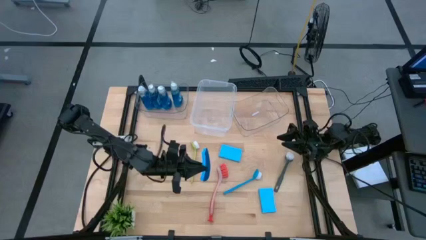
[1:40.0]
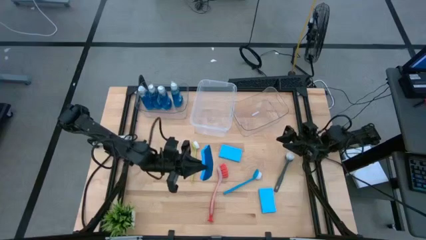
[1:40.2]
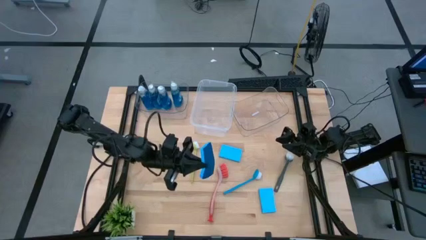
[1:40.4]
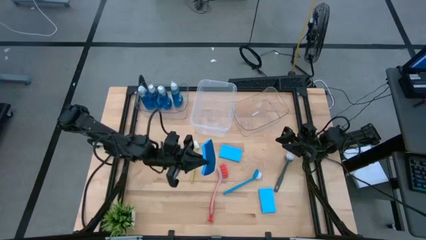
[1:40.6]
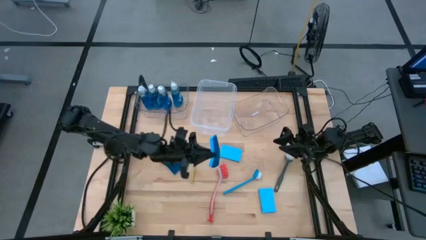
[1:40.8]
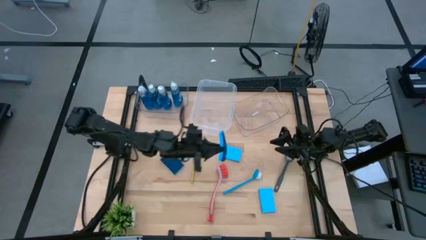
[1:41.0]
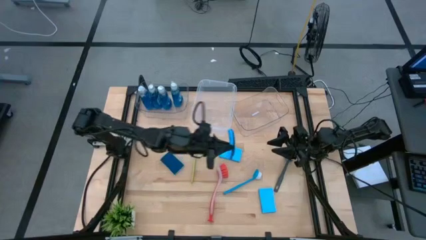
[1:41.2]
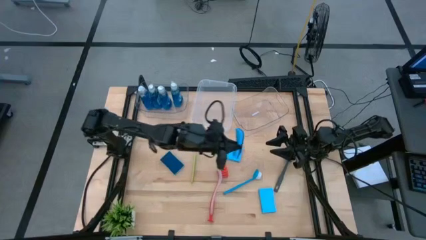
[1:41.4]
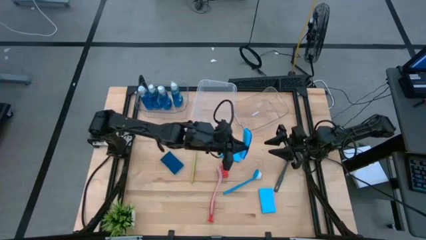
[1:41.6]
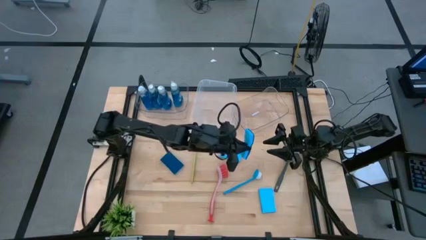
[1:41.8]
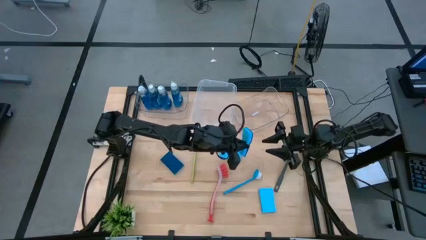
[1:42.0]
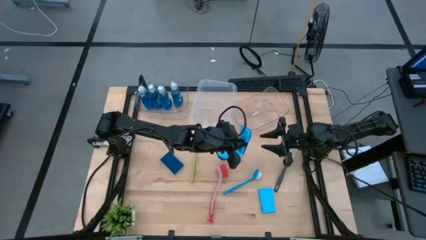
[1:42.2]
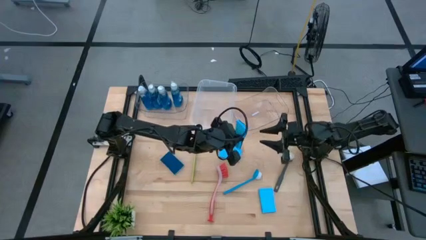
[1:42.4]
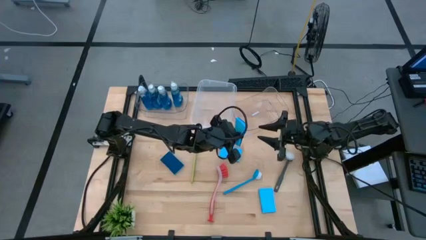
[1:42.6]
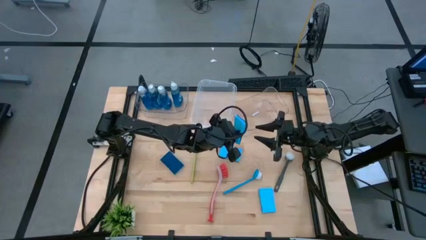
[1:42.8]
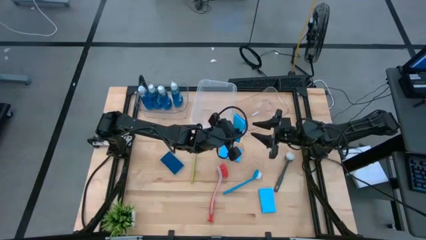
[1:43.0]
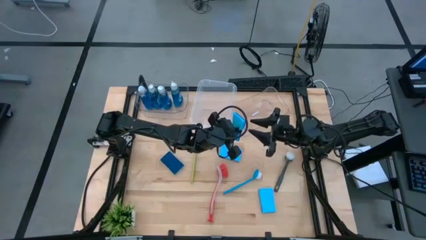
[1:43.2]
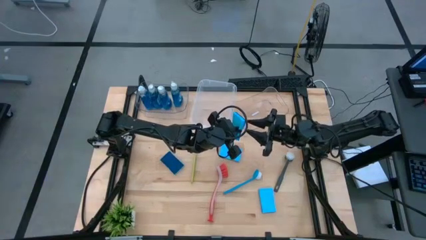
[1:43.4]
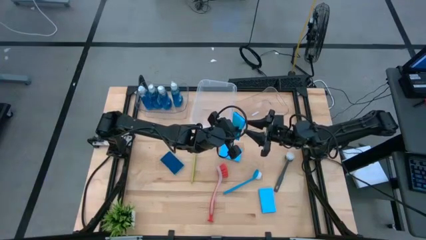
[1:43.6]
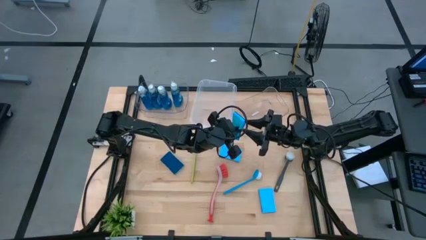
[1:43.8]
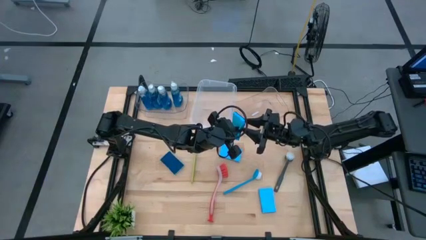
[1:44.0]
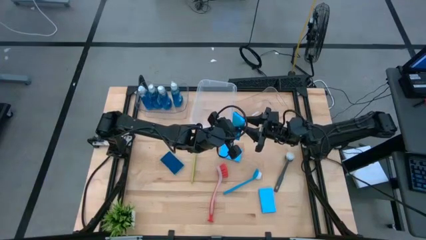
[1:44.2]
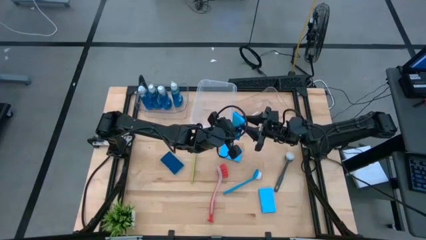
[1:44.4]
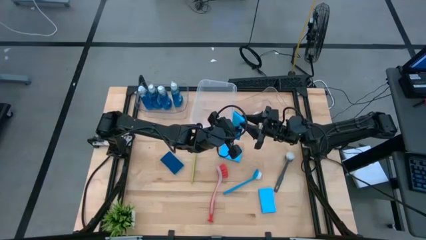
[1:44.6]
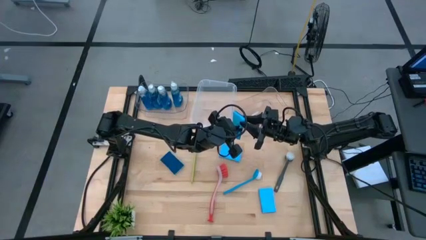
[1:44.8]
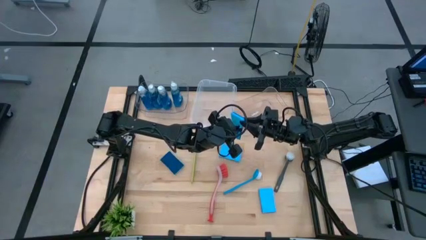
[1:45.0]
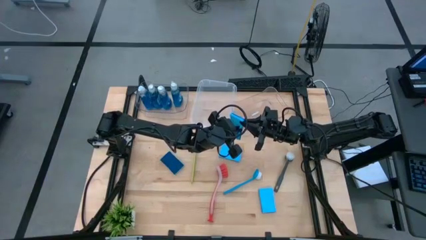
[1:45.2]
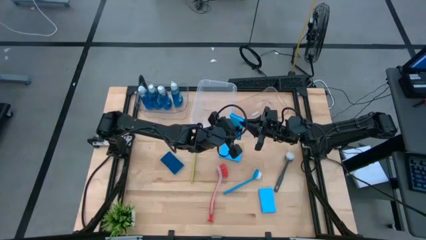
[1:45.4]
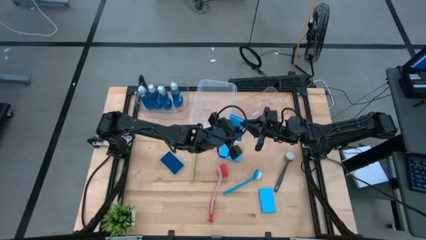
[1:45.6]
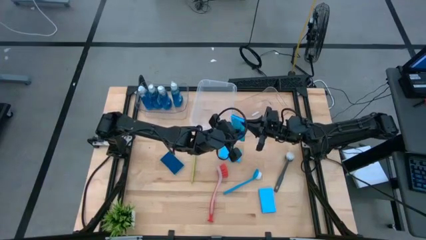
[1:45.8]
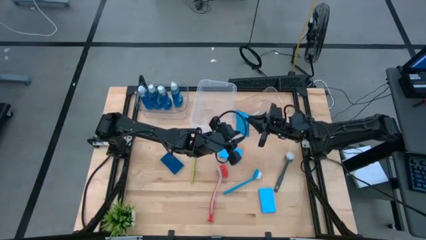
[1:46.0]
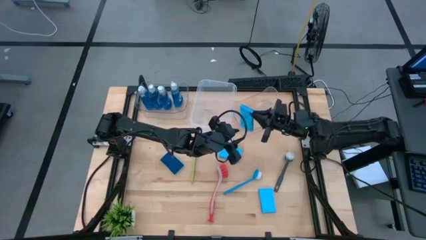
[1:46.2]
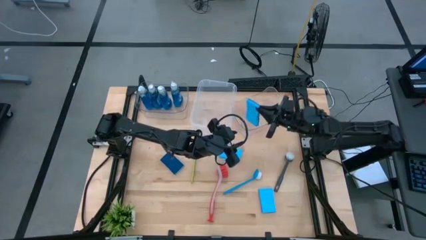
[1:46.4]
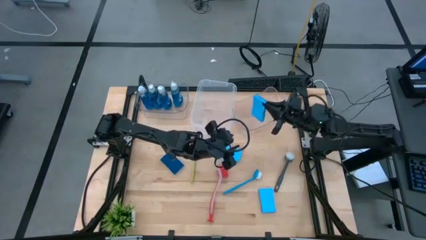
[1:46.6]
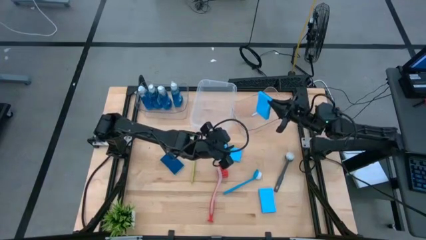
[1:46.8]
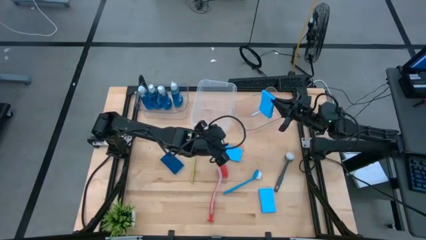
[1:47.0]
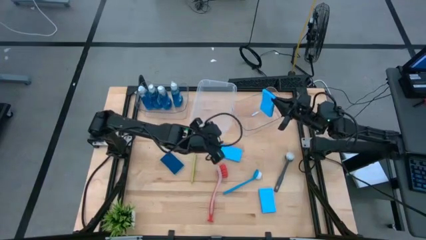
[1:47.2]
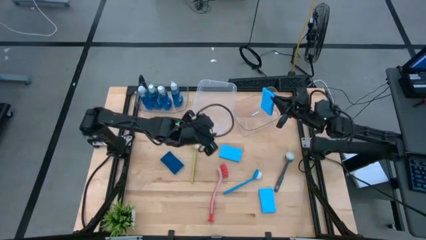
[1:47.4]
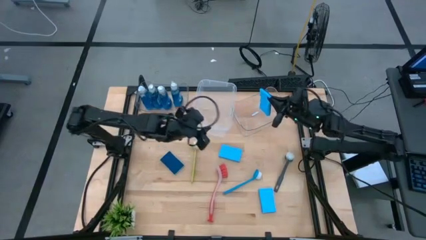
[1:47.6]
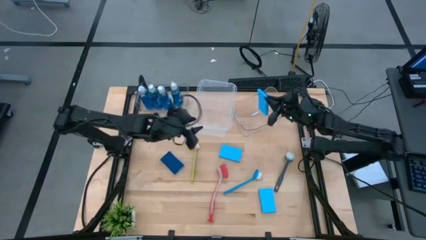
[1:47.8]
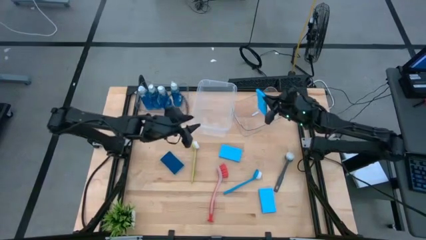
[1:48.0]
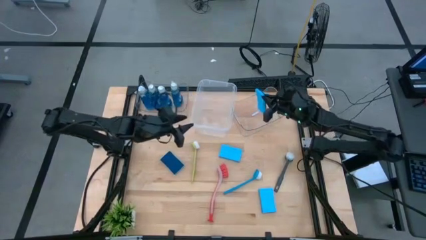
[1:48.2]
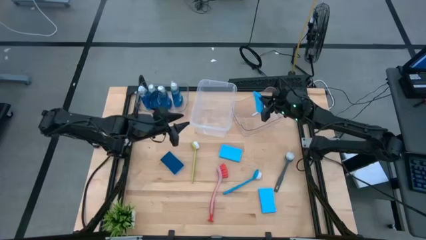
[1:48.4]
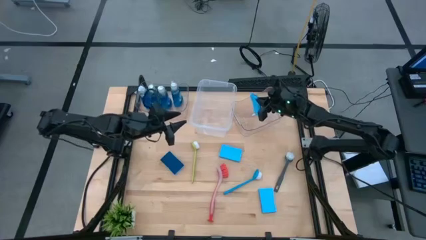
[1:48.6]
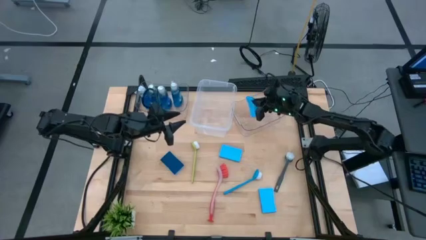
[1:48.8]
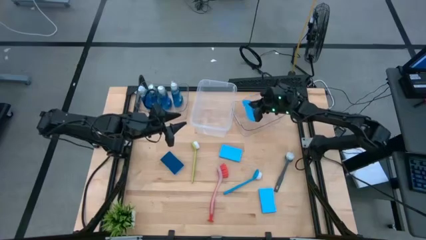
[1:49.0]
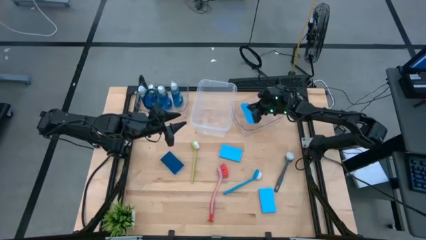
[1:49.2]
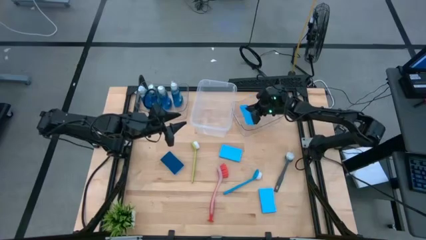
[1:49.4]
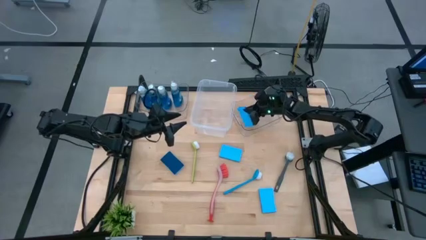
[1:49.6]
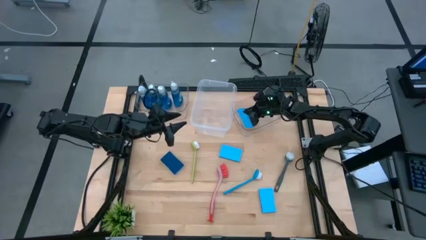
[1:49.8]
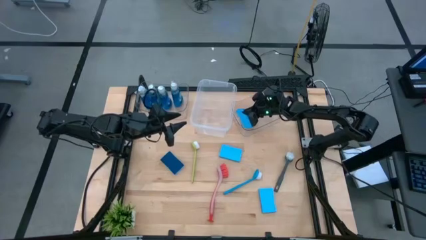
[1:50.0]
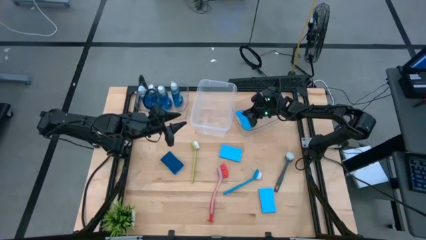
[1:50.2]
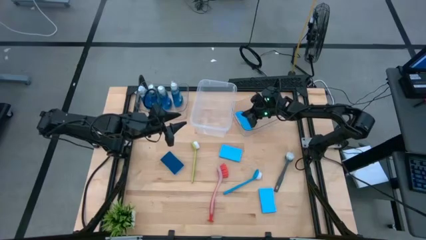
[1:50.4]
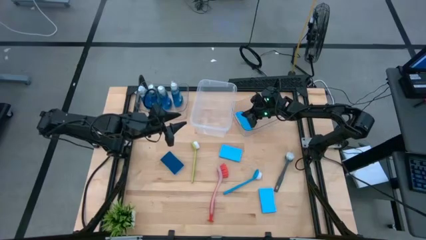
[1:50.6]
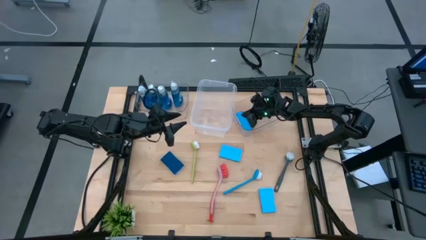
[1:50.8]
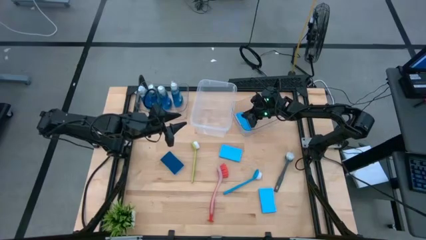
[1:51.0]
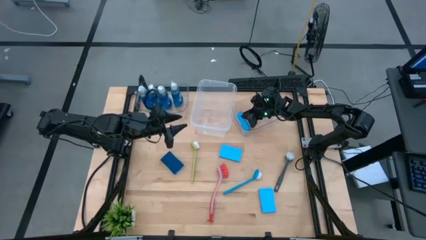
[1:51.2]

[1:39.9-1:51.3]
Task: Pick & Place Kitchen Sink Supplies
Put the sponge into the right transparent bin

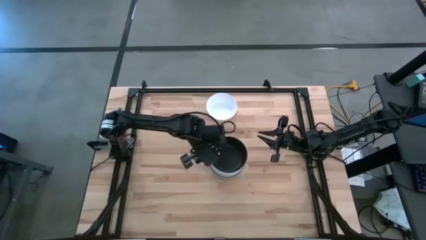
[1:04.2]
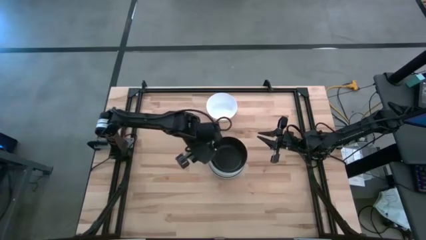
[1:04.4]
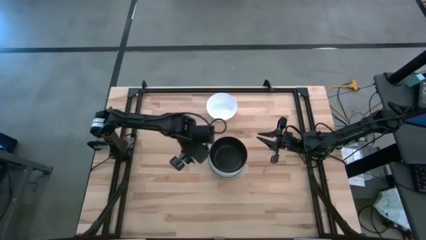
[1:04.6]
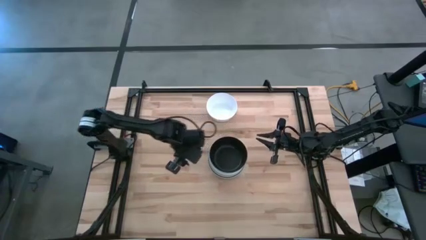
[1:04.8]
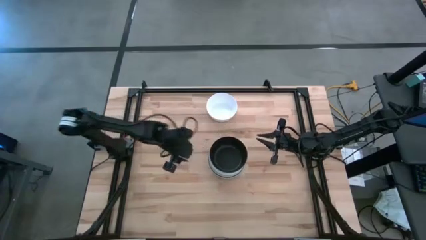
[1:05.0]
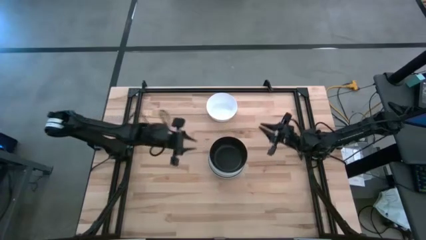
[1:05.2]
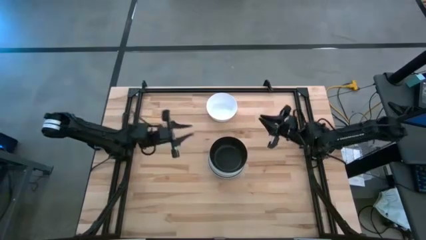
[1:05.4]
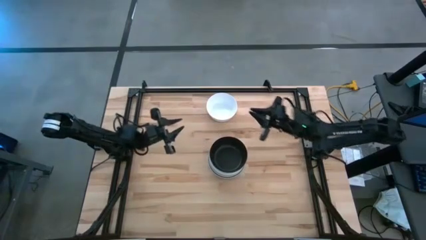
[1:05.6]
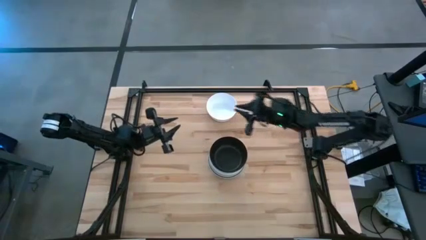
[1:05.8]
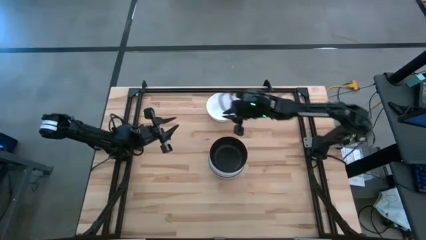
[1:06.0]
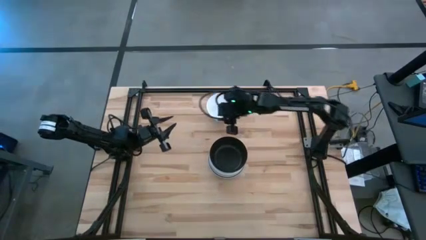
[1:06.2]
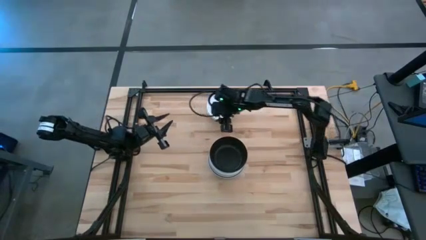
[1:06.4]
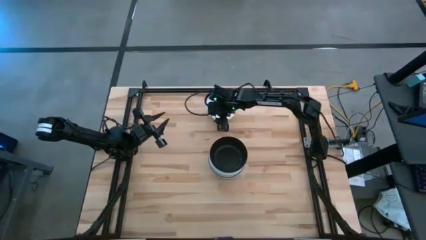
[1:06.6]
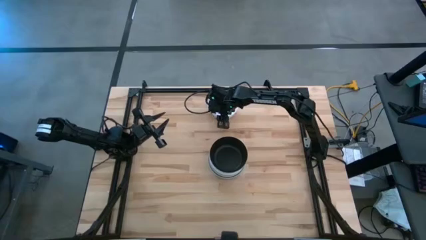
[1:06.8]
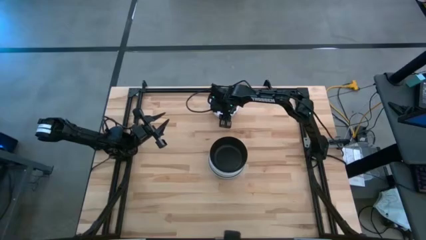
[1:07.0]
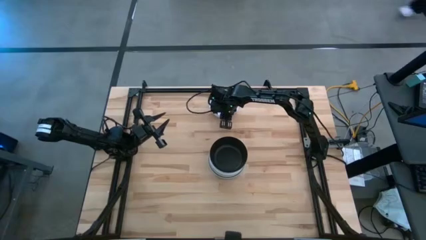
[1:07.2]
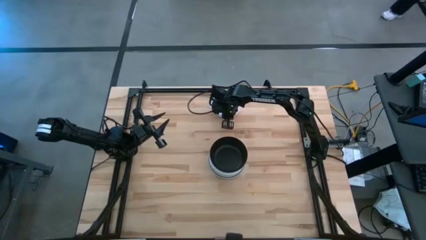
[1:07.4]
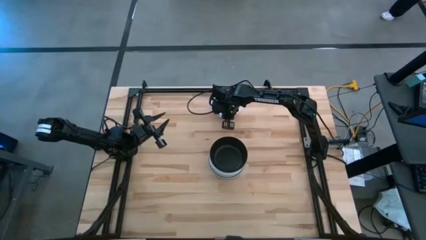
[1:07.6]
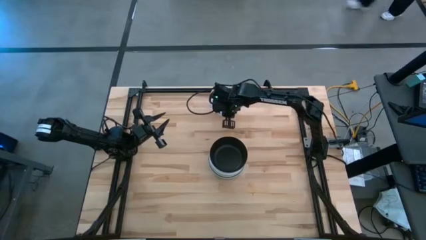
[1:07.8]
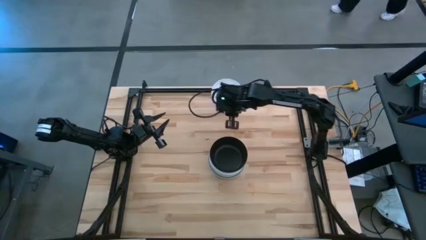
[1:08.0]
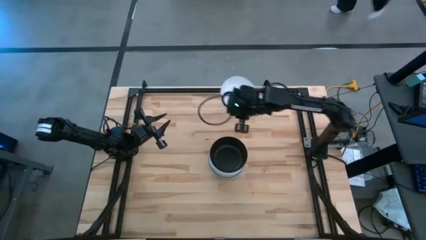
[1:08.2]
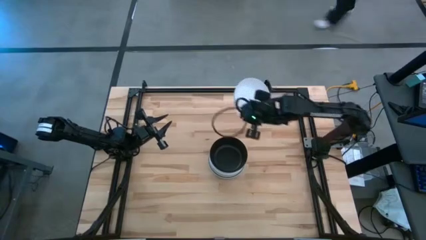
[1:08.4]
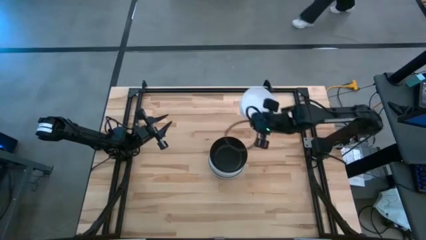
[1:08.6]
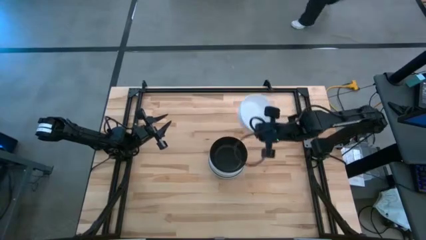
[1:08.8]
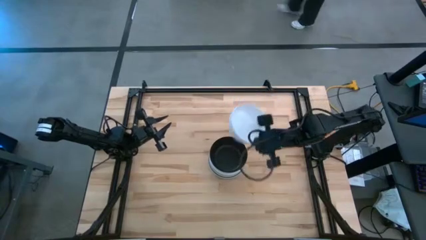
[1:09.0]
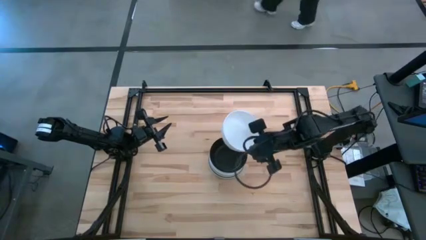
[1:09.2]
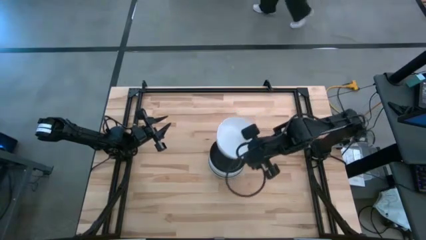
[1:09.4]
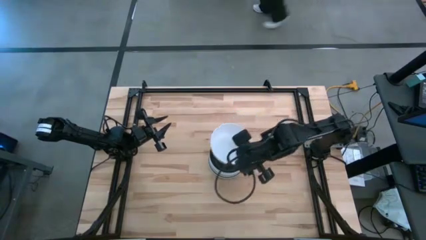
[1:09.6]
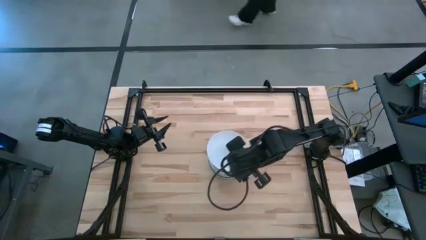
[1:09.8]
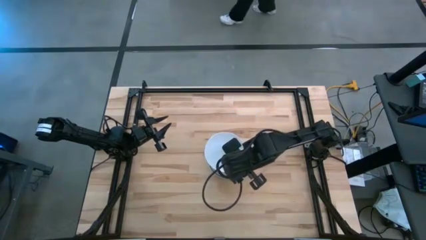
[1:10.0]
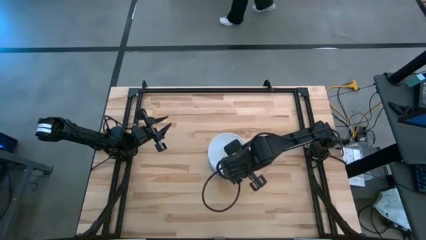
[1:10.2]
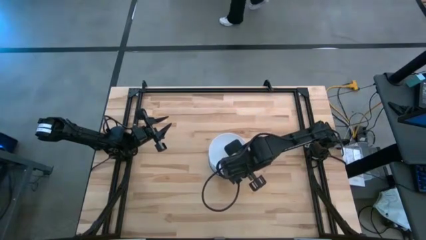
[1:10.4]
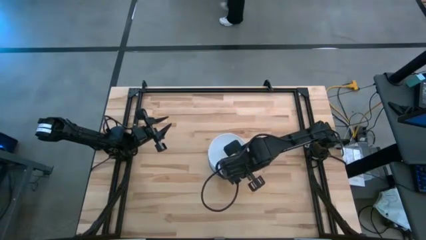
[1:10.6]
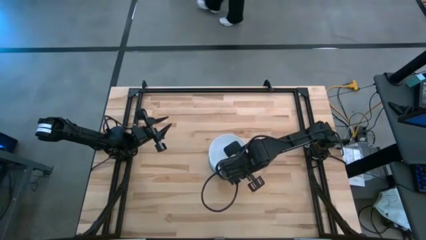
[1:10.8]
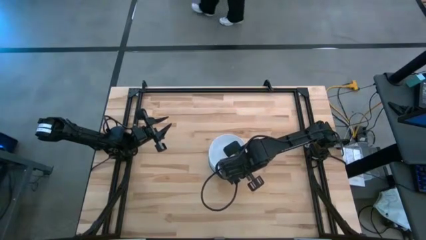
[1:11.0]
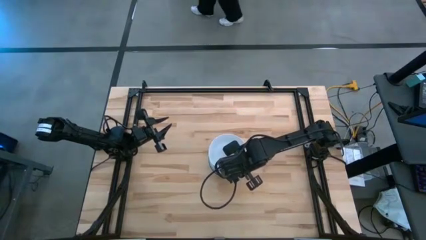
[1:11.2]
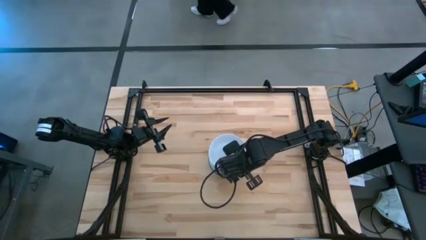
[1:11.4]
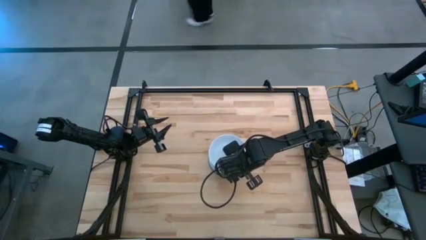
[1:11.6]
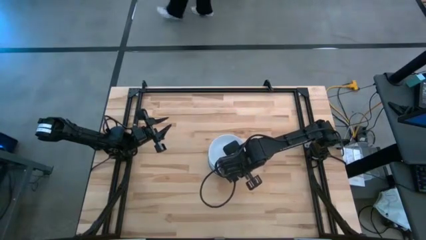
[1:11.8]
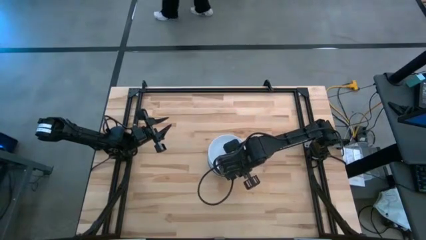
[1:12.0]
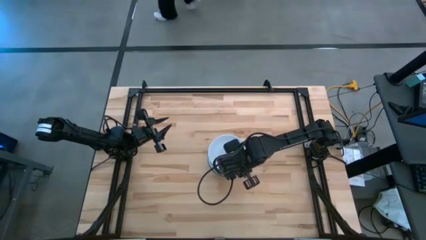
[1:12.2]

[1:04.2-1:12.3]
Task: Nest bowls inside each other
Stack the white bowl on top of the black bowl
